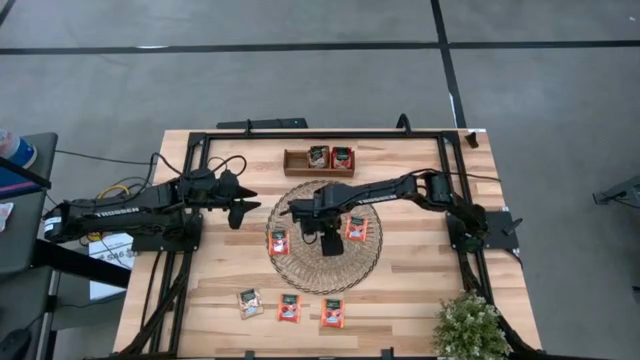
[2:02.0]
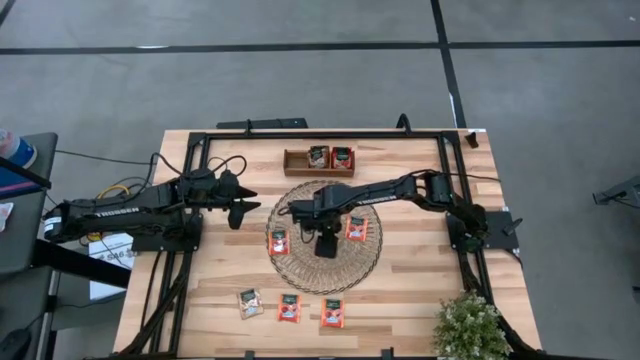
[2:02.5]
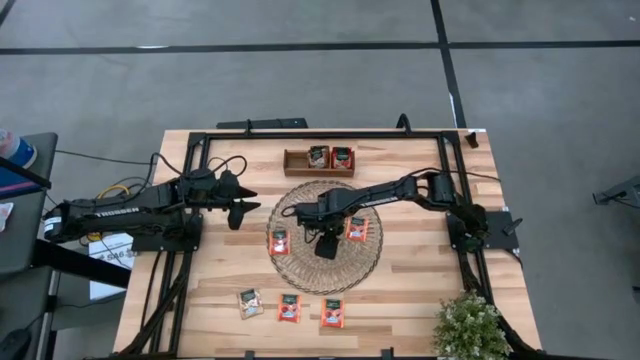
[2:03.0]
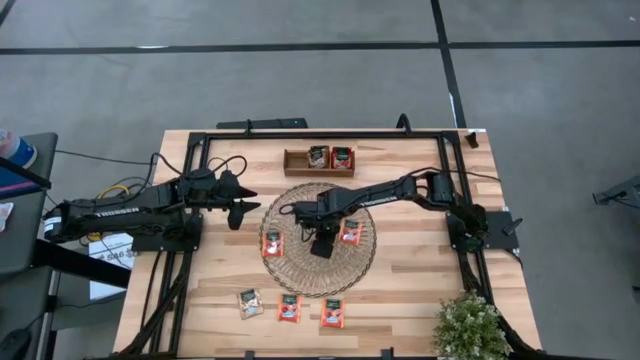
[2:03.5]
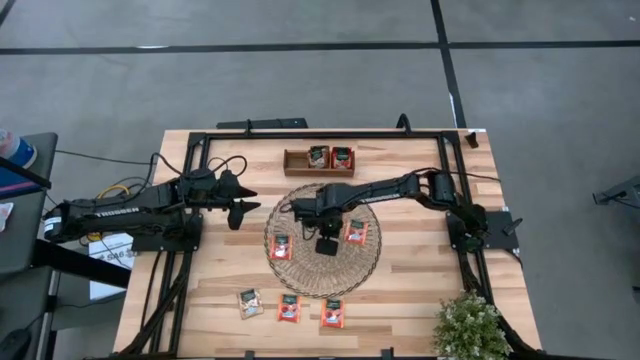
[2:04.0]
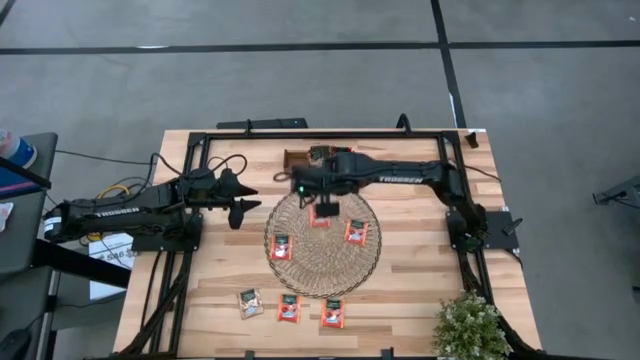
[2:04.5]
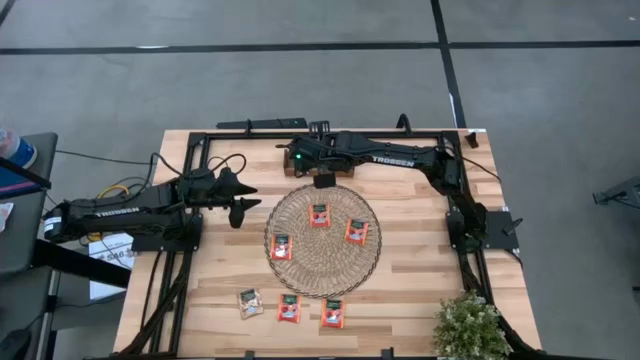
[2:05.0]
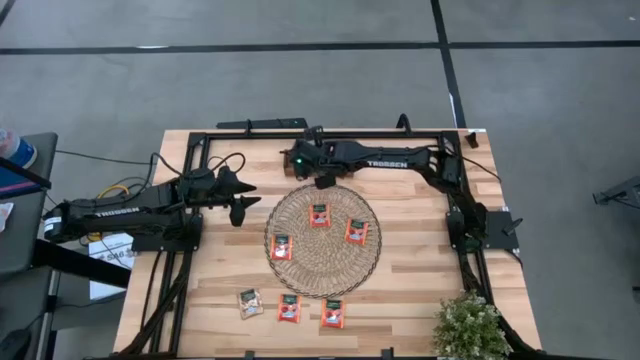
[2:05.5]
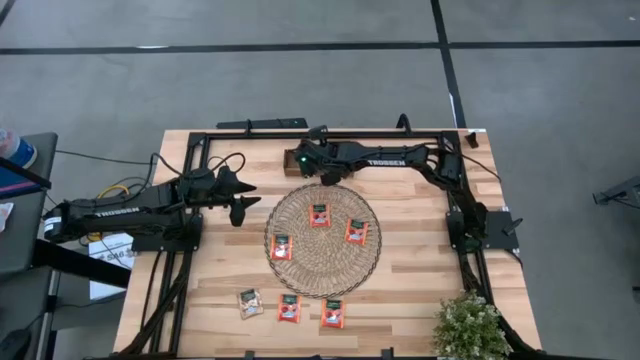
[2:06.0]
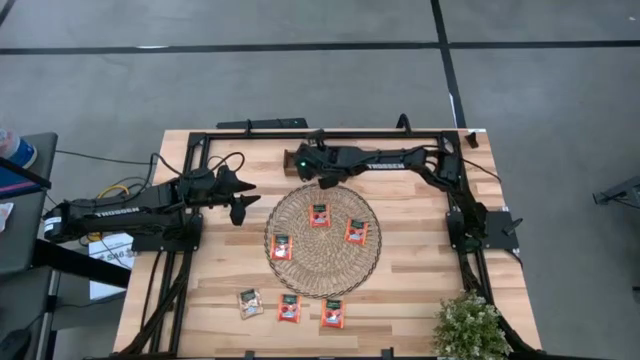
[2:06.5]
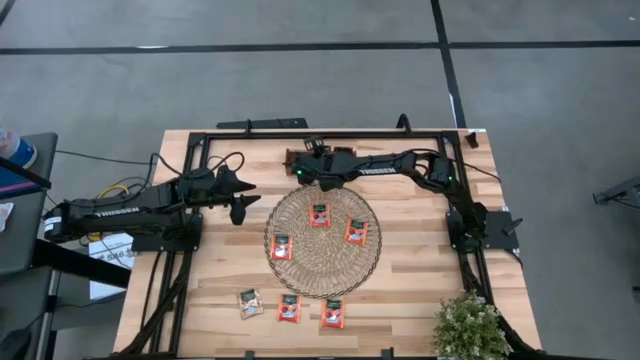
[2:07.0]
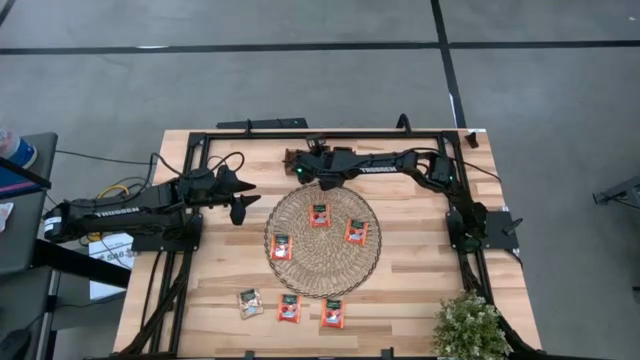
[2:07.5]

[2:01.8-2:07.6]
Task: Pick & Place Tea
Put the brown tea bag into the middle section of the wooden organizer

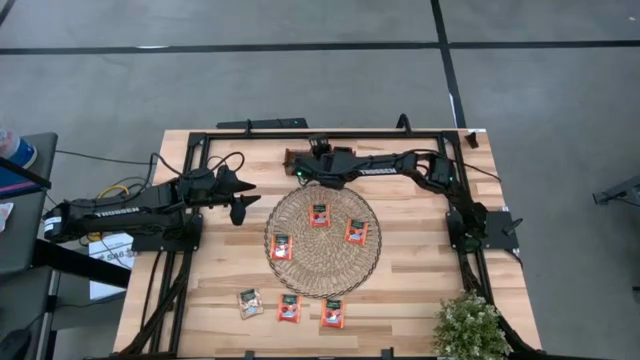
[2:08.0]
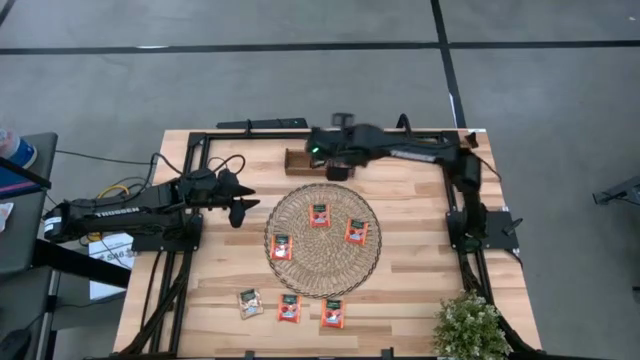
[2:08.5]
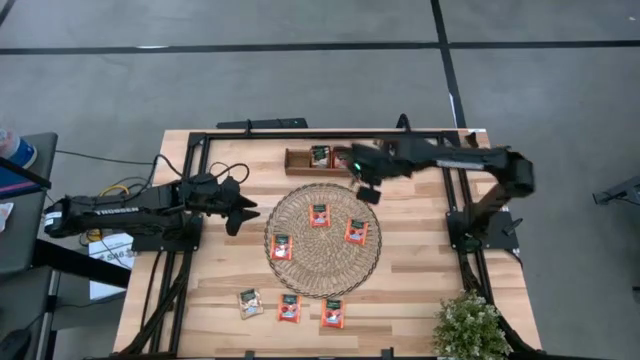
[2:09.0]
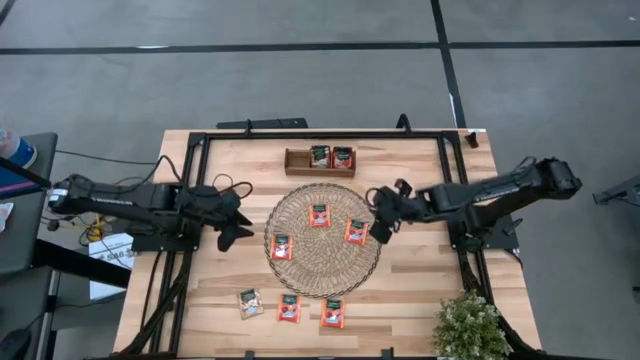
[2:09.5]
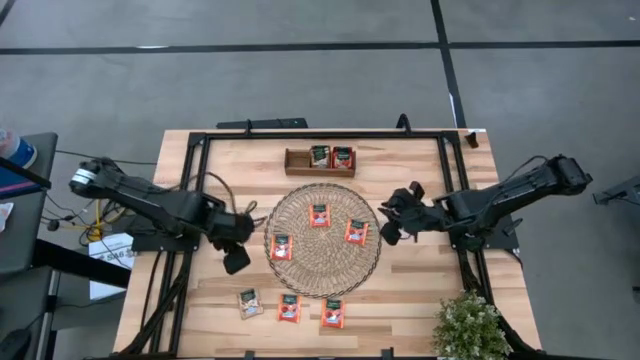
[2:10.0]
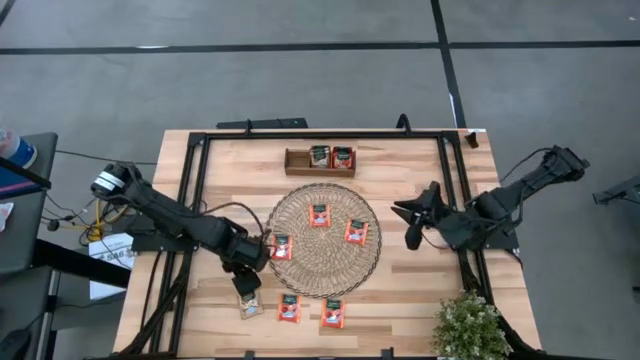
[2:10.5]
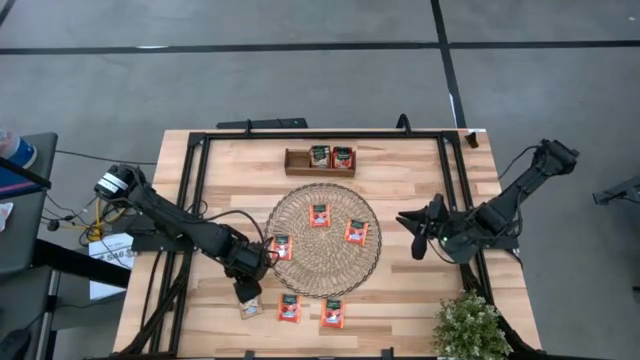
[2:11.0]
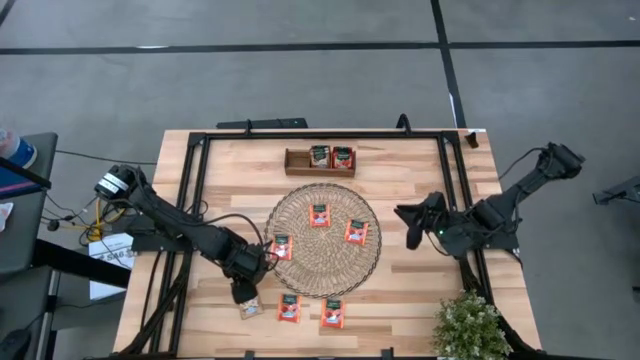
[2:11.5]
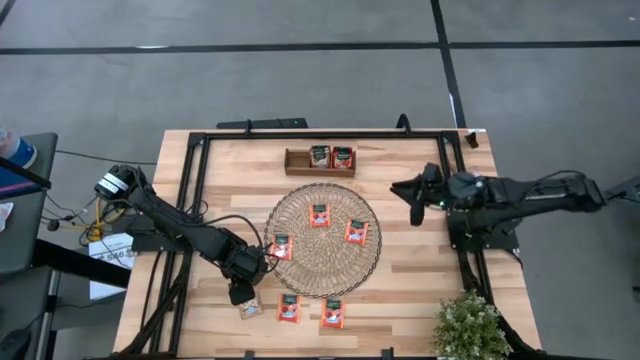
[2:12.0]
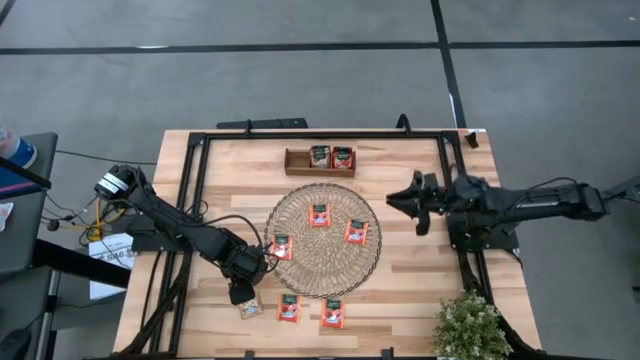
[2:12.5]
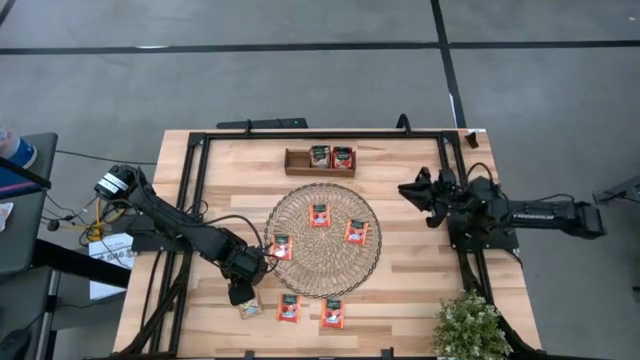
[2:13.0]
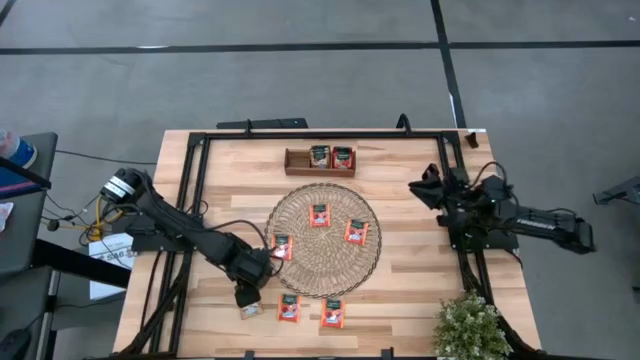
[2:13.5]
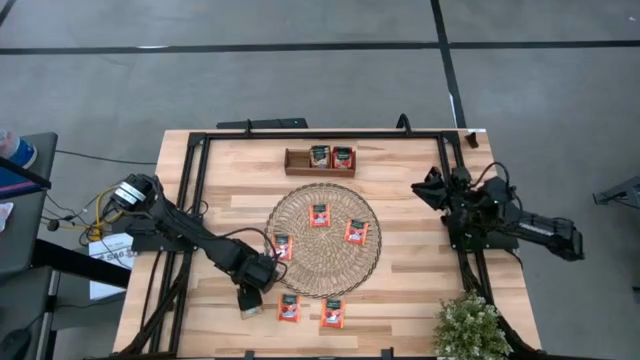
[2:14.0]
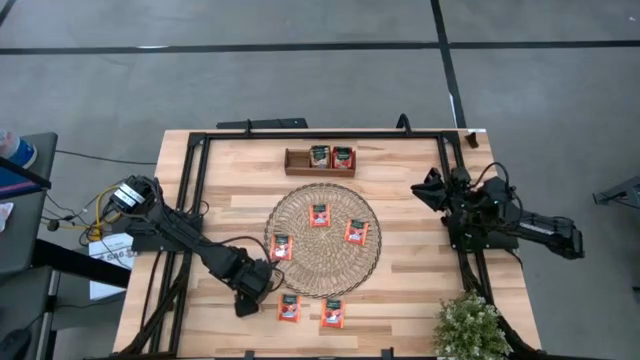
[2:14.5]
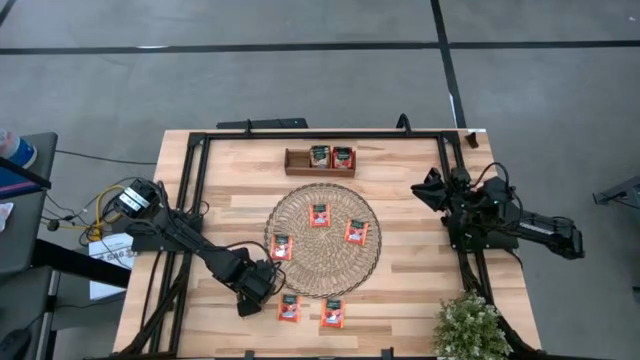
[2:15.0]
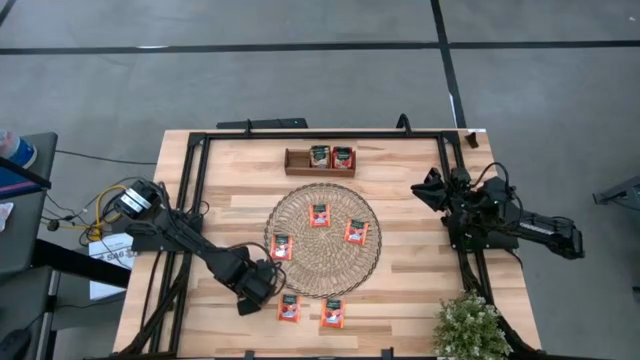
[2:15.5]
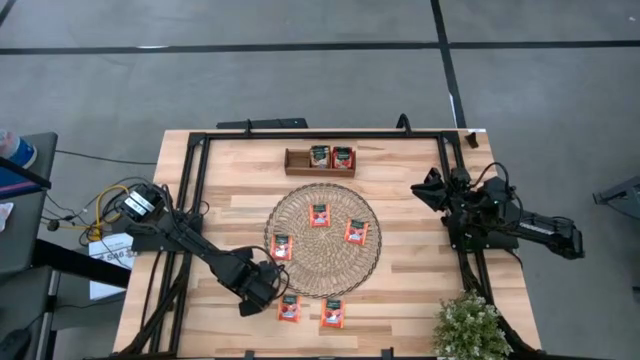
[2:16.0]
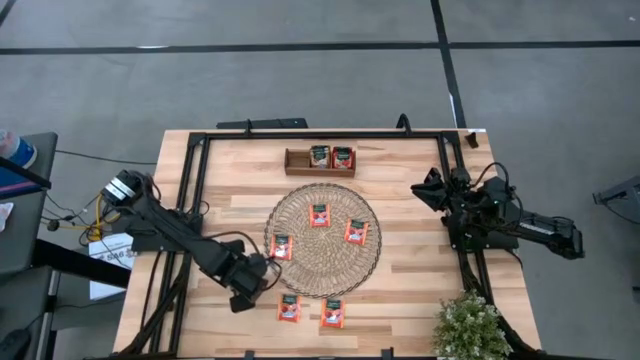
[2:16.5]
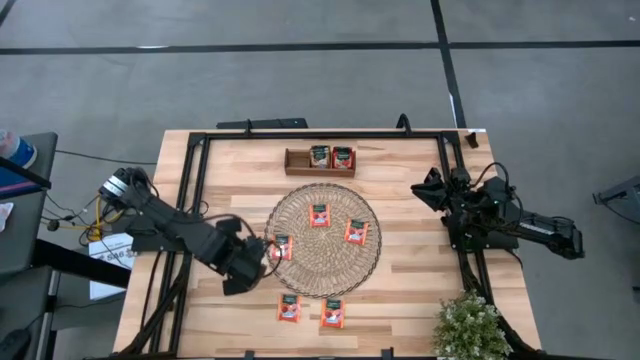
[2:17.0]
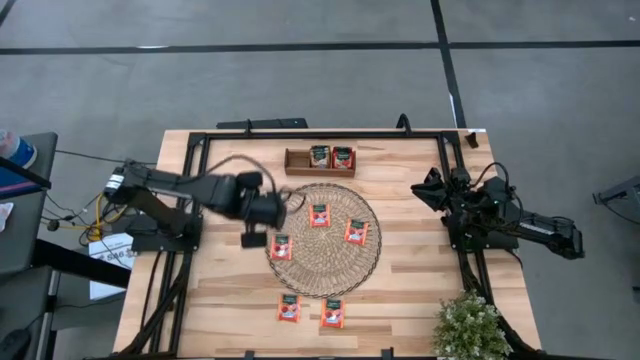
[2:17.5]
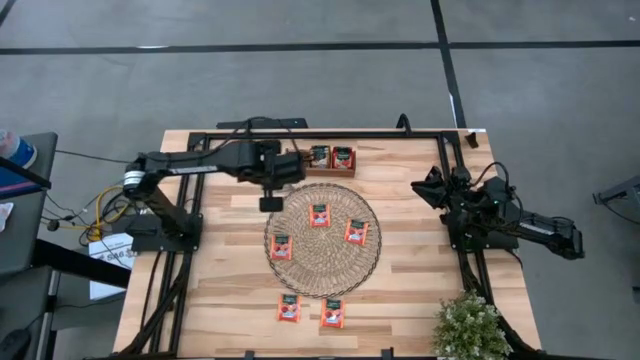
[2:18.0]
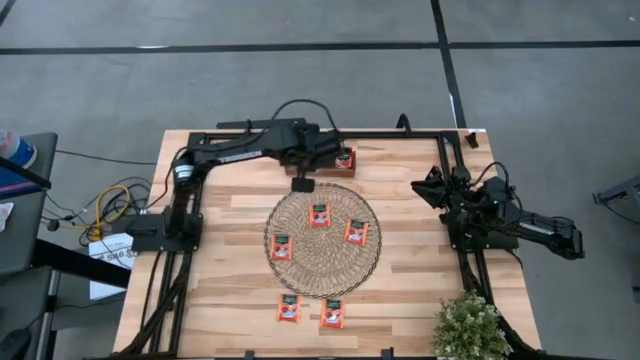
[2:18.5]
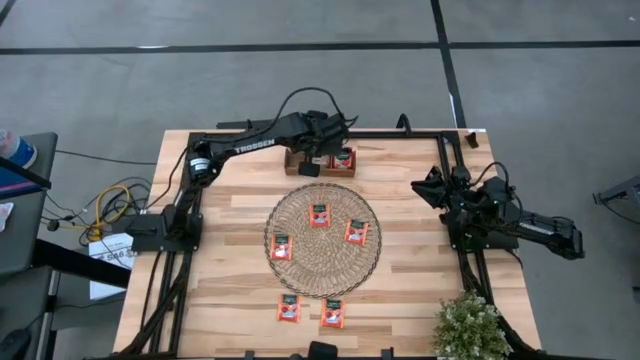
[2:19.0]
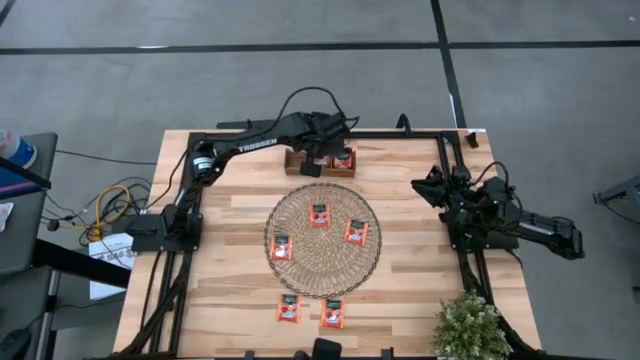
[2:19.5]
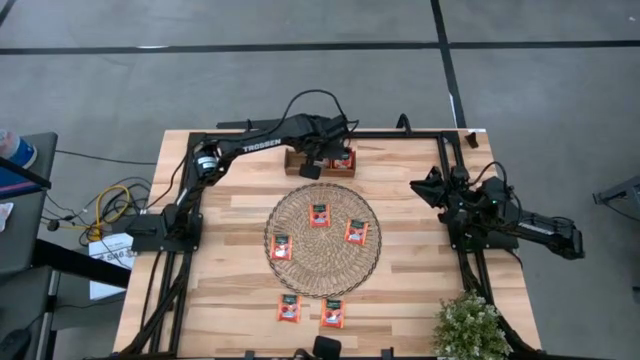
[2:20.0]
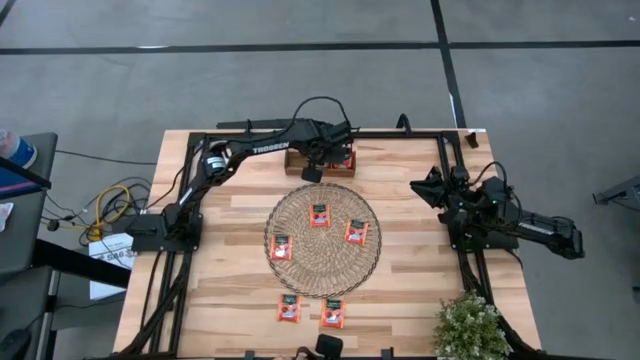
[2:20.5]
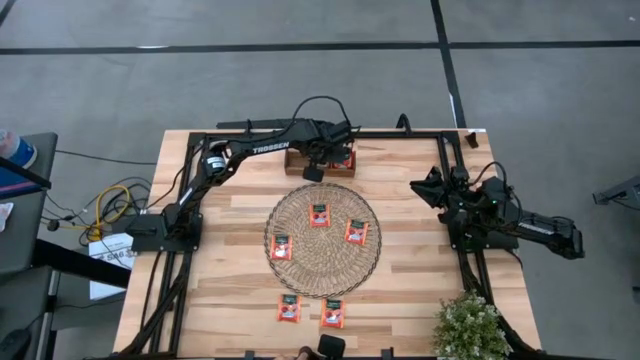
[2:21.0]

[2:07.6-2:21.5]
Put the brown tea bag into the middle section of the wooden organizer

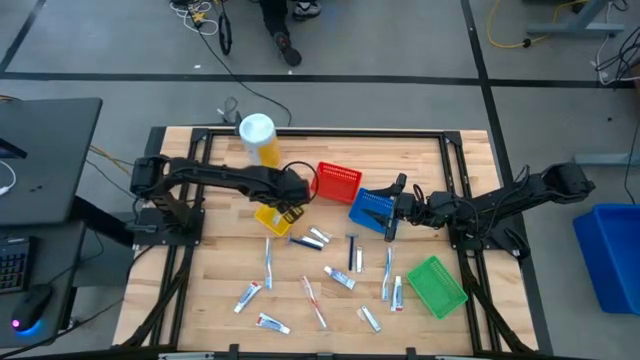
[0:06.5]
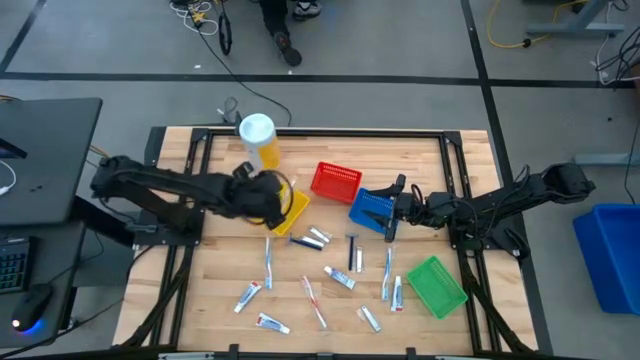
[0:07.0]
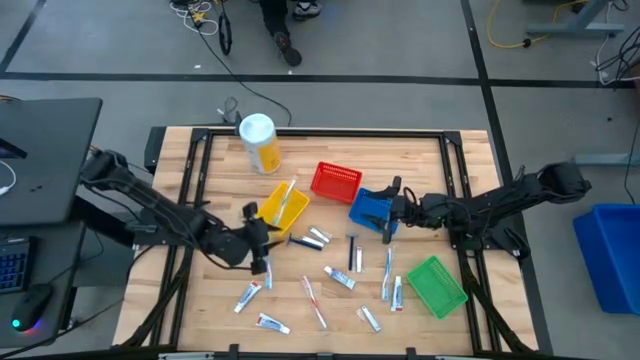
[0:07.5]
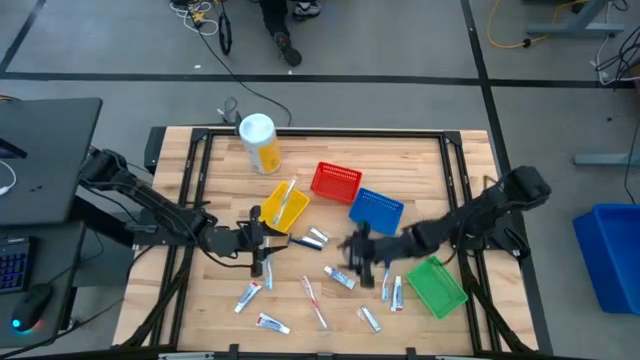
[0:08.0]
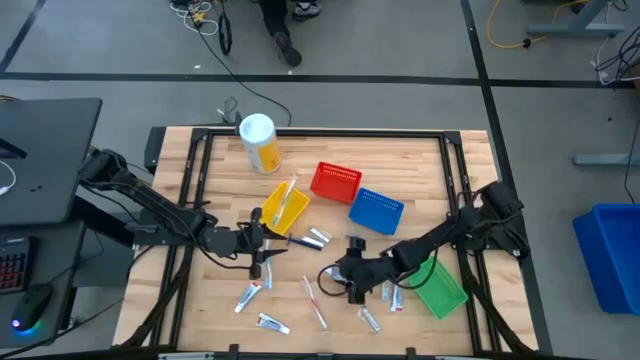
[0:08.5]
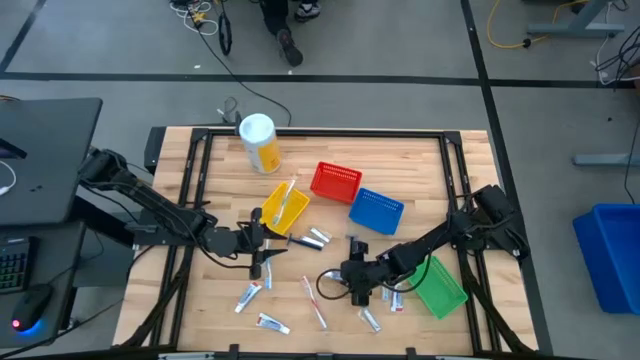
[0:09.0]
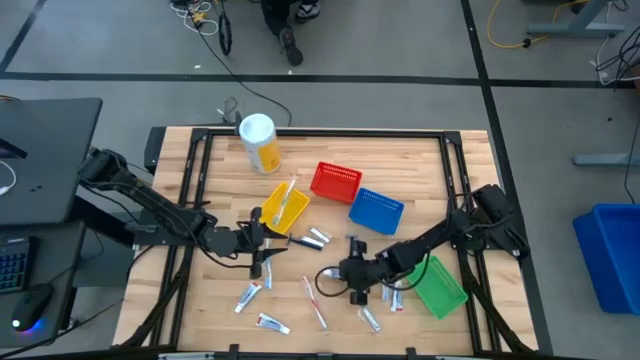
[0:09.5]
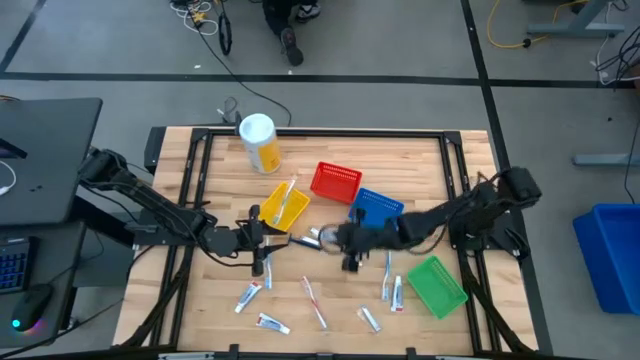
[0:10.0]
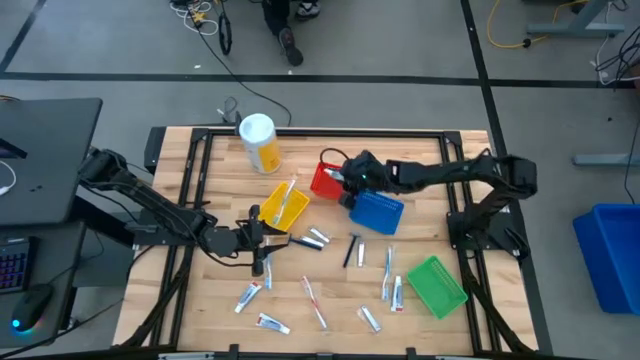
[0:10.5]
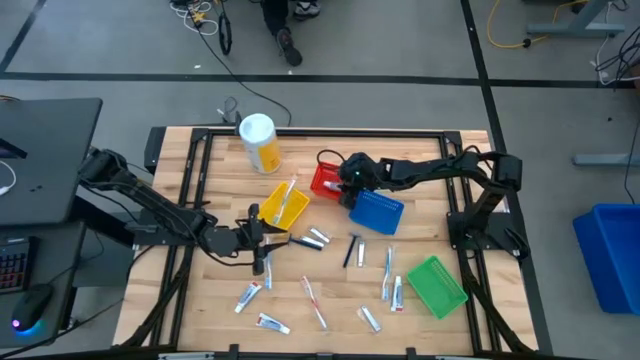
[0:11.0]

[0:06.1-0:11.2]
Task: Pick & Place Travel size toiletries
Put the white toothpaste into the red bin
